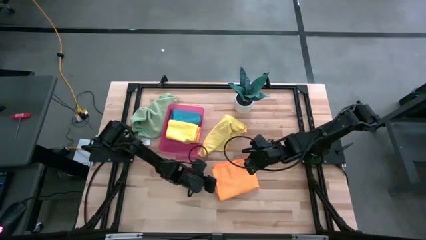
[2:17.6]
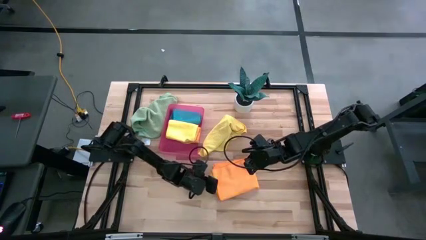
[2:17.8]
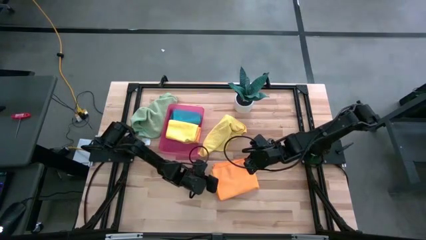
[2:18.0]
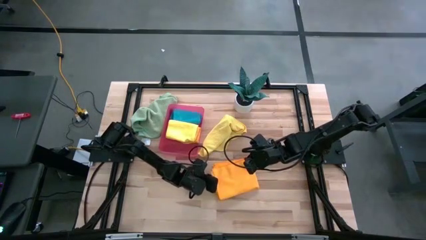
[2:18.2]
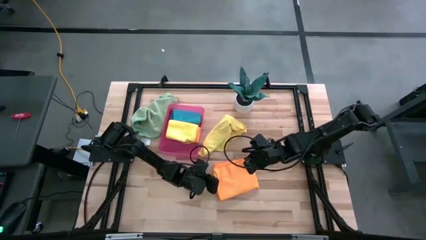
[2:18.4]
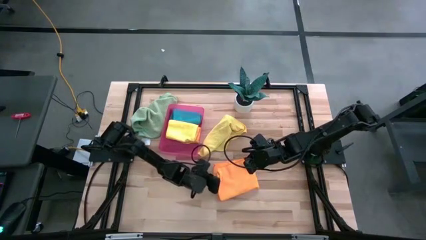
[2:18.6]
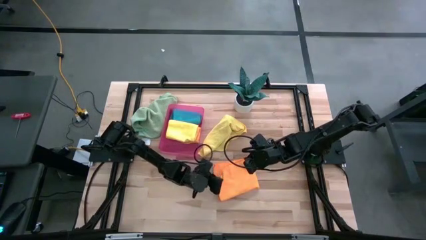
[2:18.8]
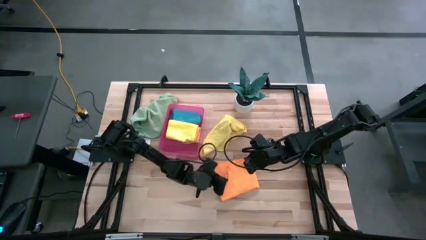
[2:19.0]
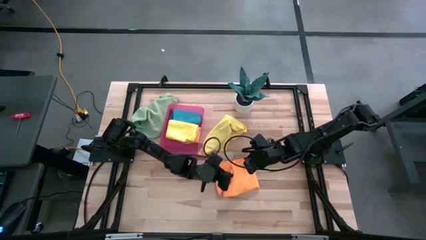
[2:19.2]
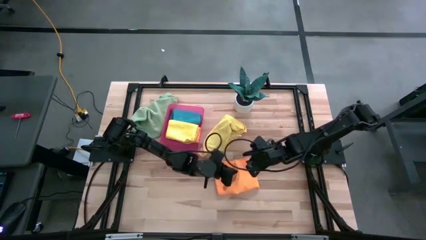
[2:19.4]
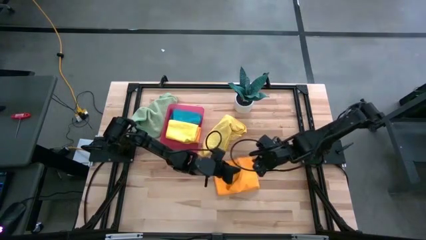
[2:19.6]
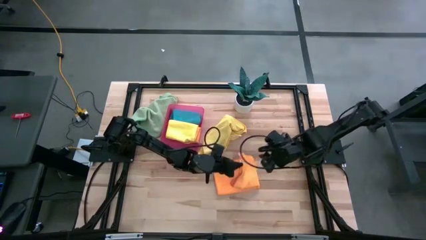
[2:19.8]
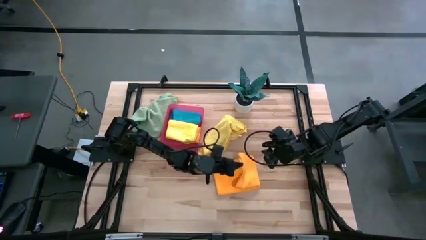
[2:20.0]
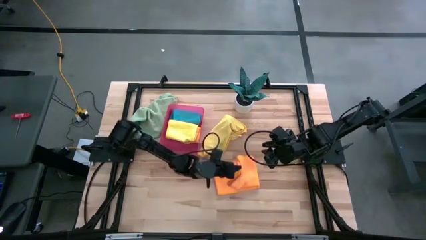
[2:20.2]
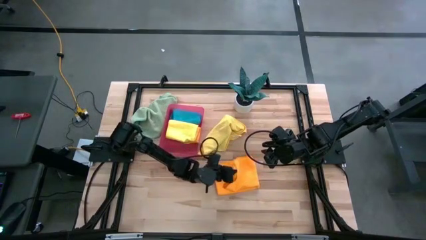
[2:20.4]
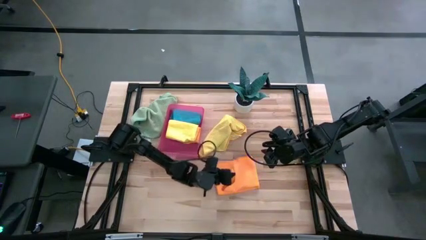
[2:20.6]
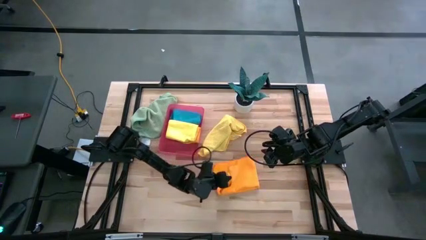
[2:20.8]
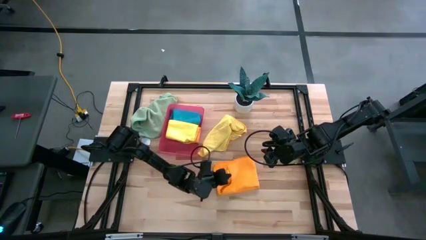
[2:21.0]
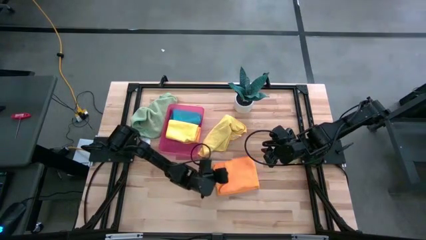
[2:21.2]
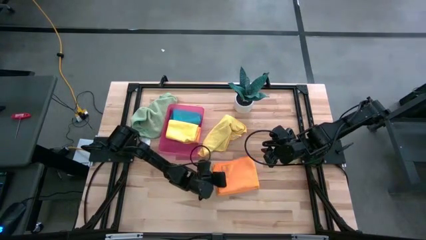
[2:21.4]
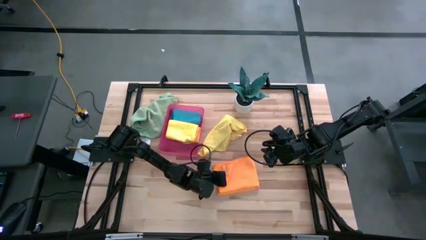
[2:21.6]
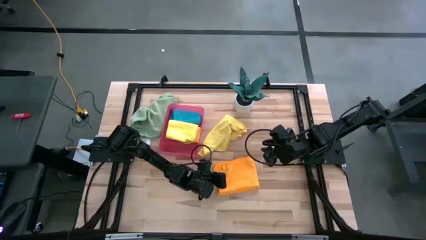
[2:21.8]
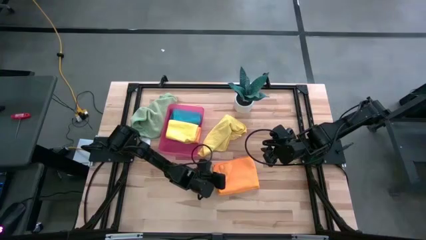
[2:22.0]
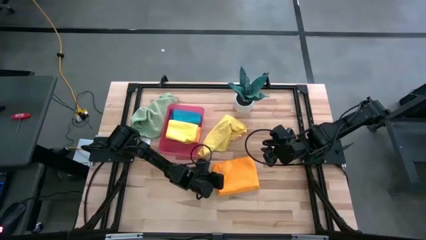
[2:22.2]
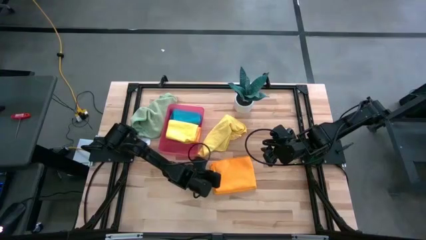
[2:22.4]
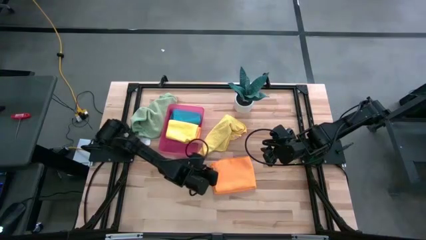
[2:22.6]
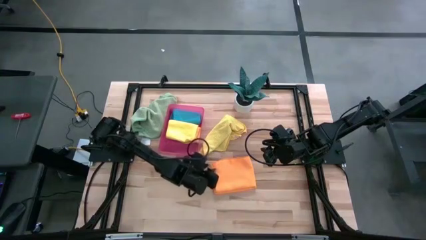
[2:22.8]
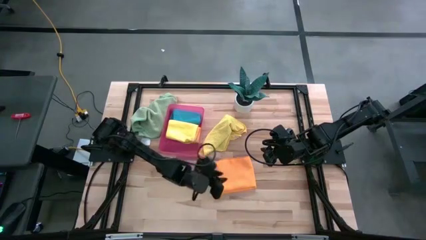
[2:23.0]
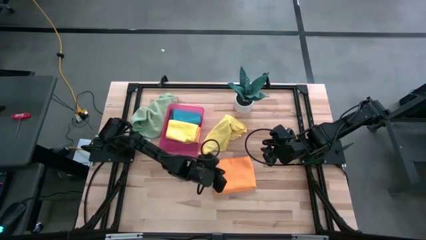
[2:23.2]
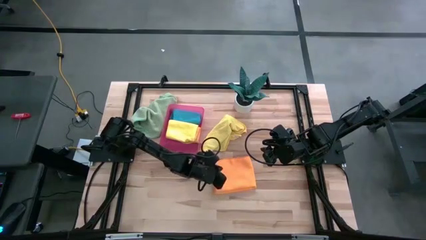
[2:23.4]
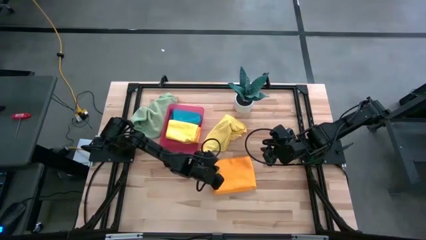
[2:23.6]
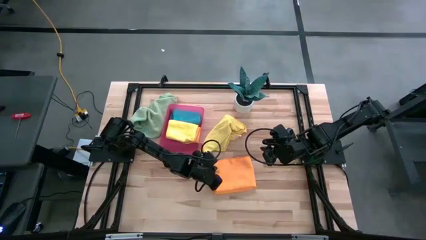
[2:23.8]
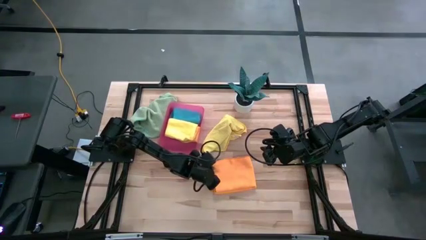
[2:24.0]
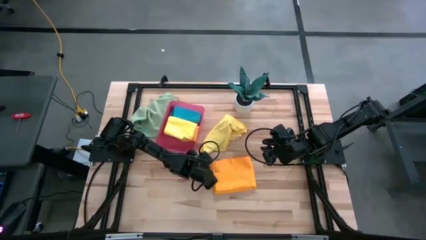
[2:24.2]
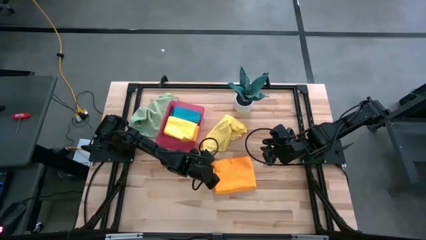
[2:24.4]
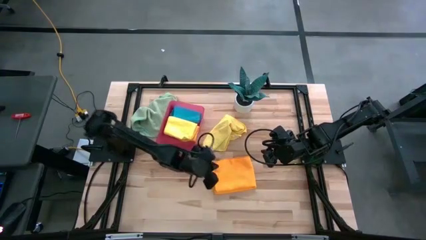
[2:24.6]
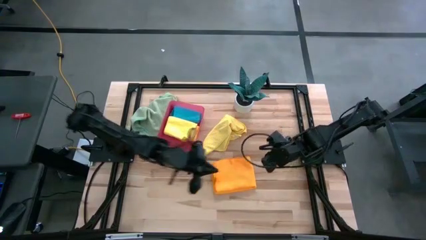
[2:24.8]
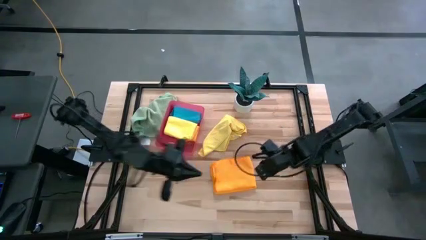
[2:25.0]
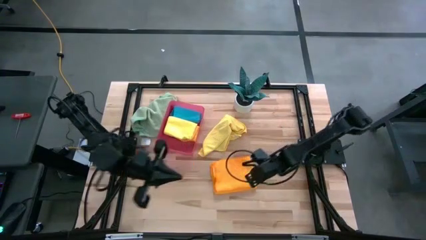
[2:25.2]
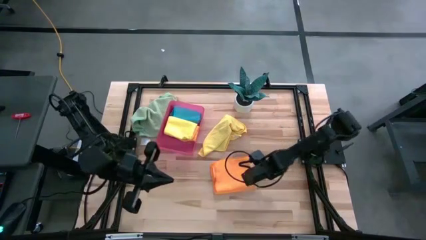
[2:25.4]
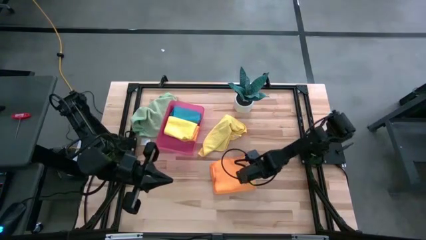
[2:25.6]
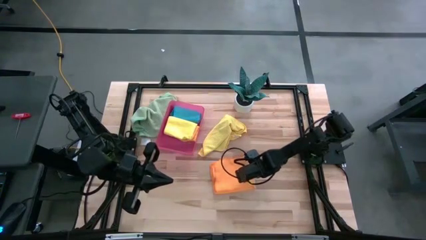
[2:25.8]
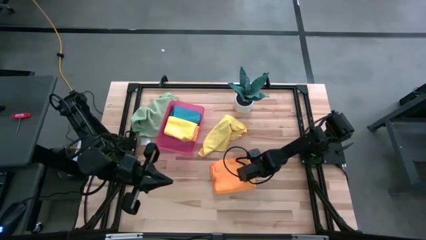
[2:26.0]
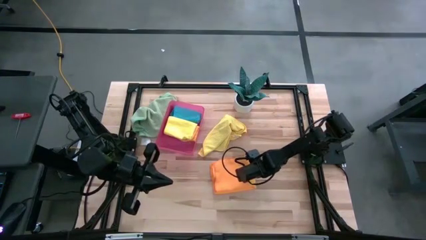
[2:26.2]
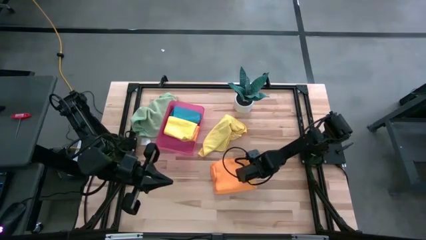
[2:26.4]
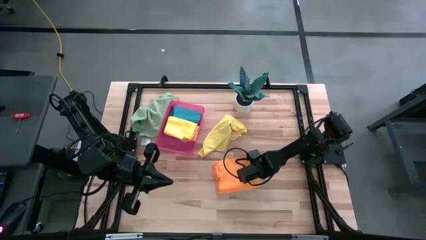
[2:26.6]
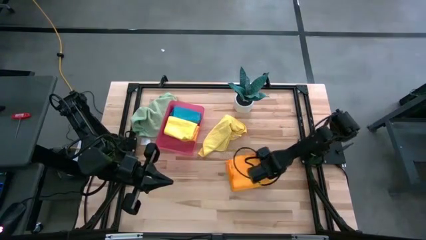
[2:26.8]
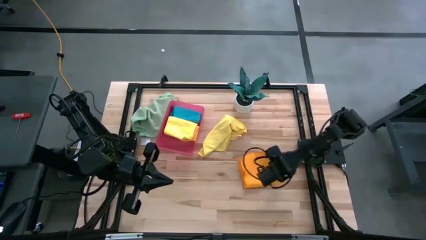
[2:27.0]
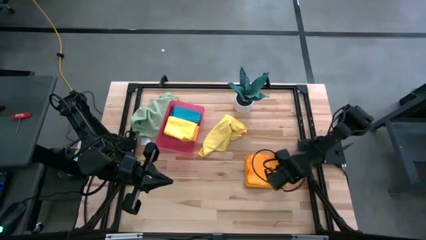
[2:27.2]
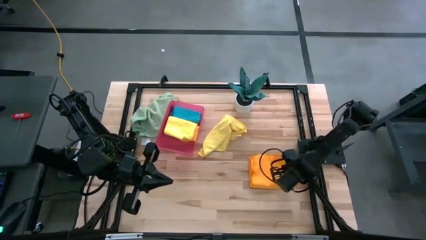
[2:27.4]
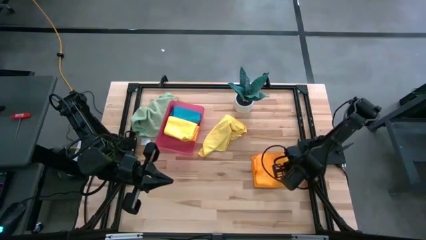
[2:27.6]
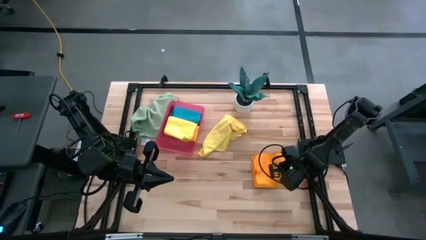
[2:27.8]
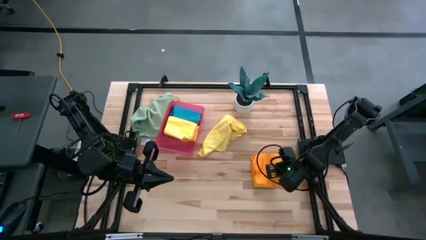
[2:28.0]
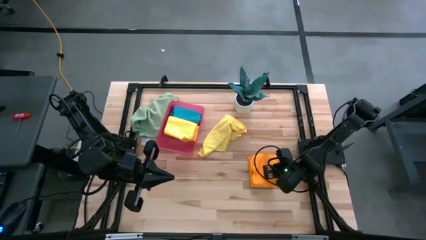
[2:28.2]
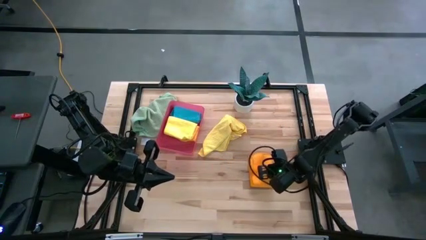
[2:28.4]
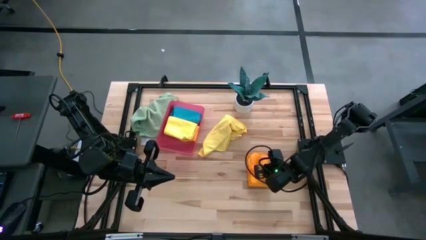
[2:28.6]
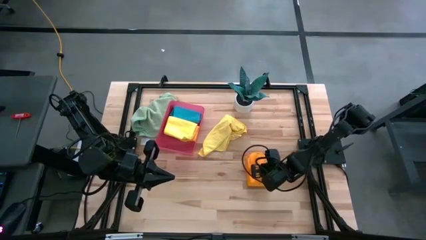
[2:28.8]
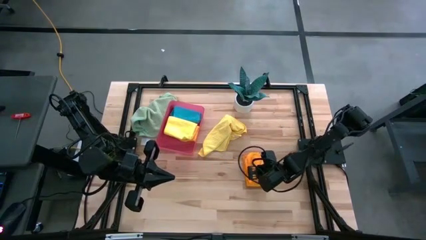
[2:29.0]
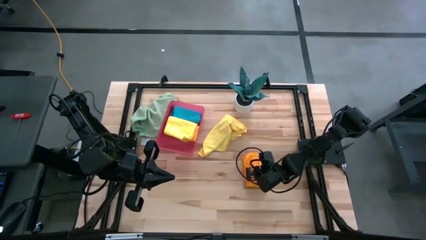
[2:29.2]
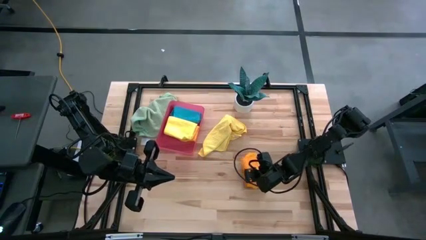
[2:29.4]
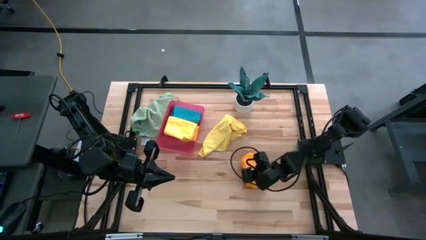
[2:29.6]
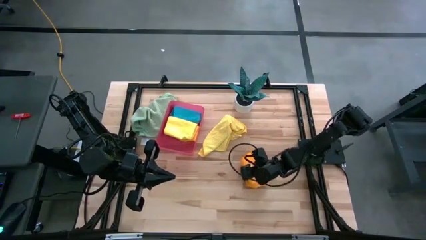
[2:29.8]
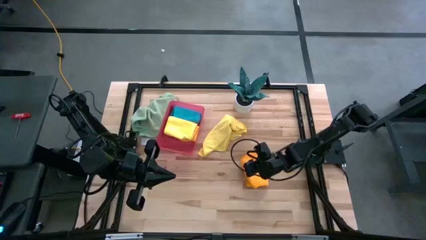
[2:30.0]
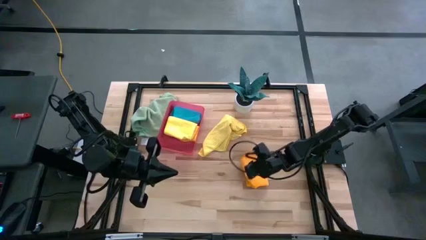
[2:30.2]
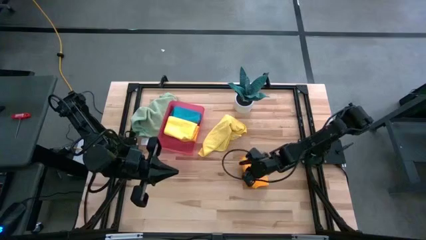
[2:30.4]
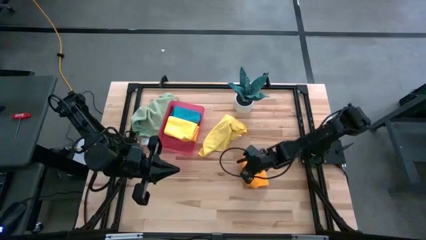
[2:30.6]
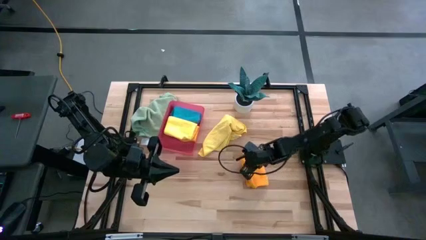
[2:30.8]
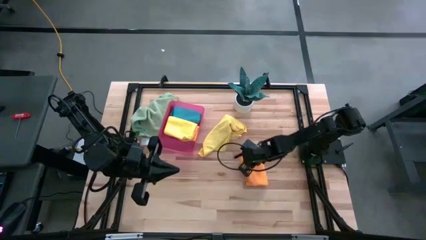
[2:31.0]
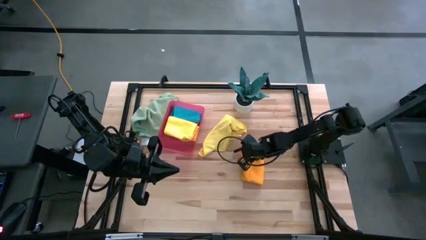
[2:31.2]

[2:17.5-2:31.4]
Task: Fold microfiber towels
Fold the orange microfiber cloth

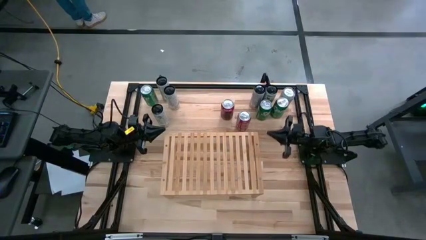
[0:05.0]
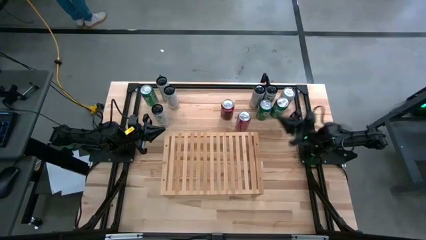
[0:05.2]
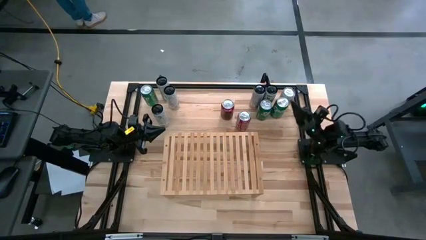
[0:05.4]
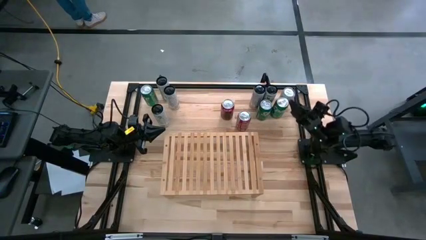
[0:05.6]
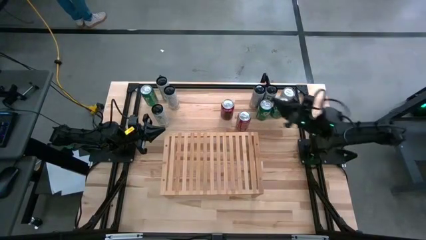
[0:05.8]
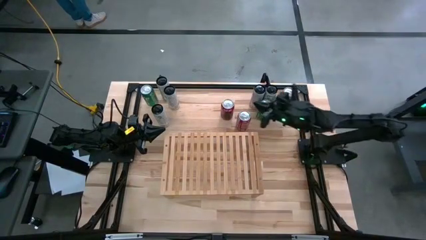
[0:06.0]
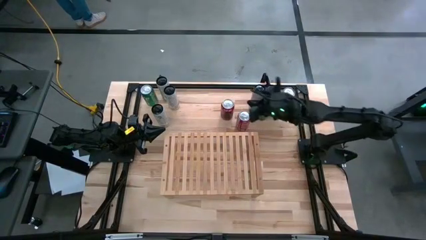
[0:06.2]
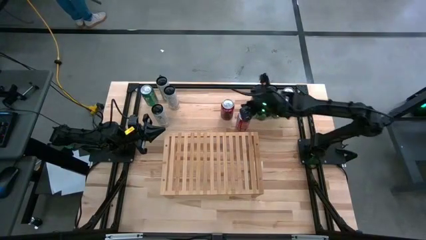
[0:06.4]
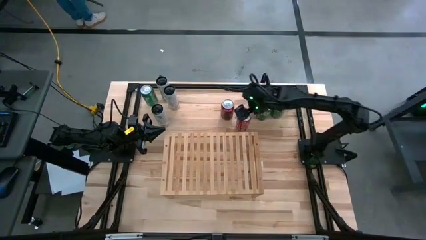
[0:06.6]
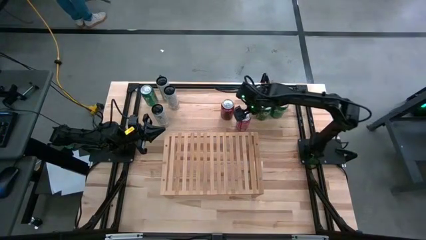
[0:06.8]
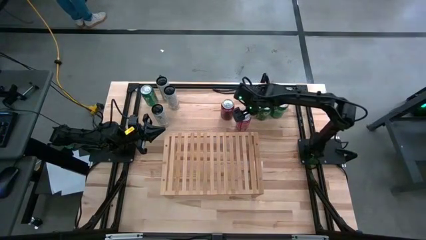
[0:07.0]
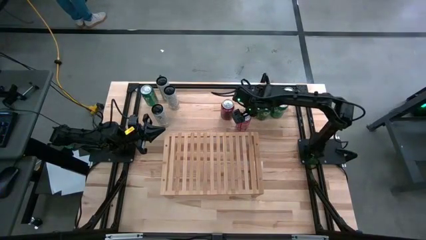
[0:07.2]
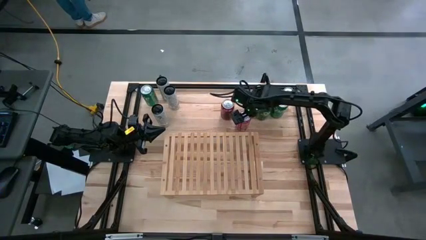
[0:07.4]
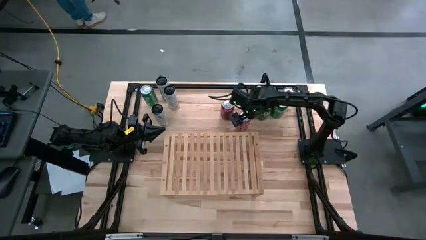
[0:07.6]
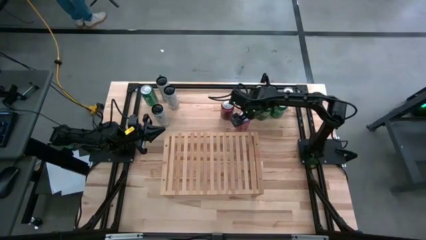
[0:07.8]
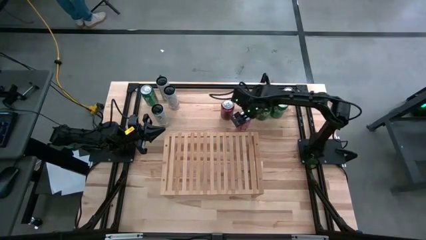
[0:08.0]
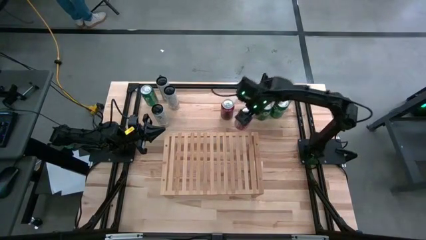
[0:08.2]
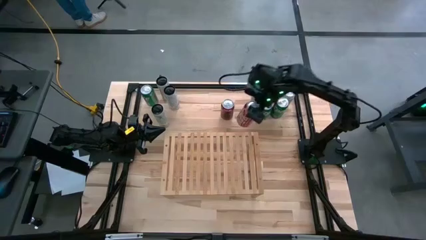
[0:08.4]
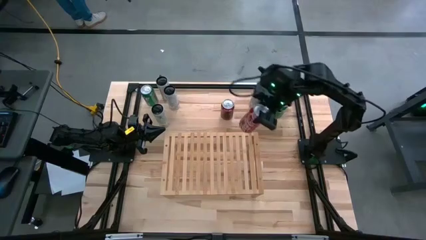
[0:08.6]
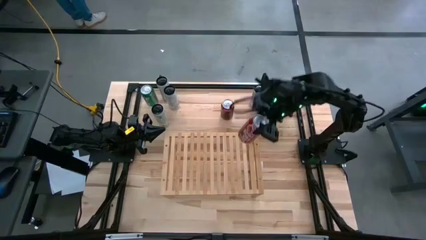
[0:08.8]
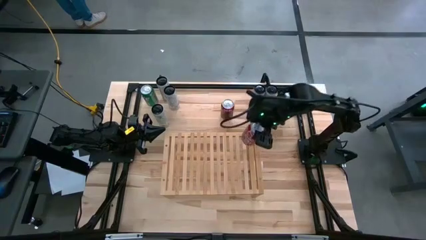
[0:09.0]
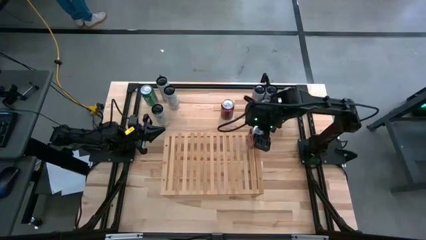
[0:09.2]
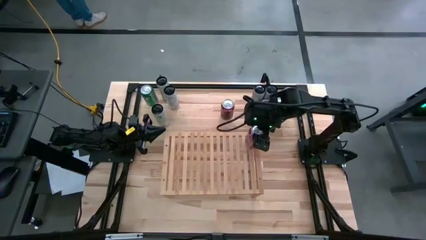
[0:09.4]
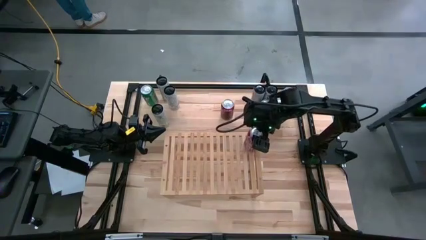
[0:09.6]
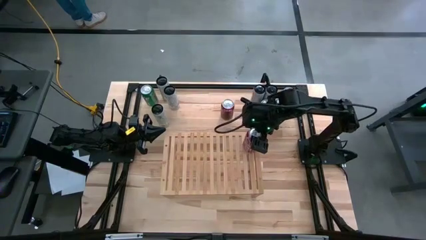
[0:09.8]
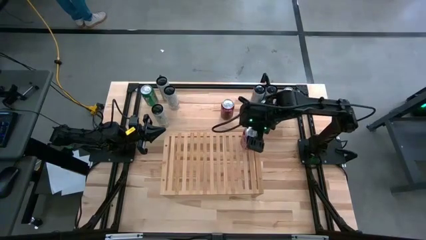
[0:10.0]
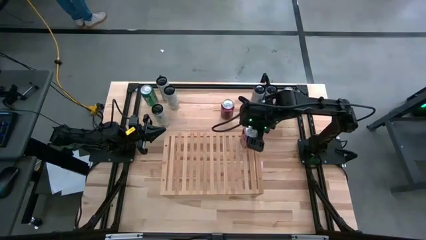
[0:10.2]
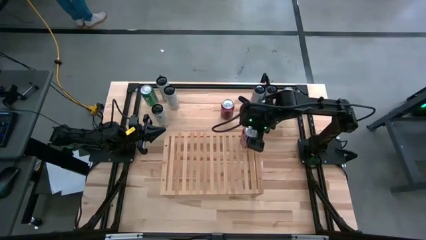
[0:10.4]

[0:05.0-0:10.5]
Task: Place canned beverage on shelf
Put the bottom red-white soda can on the shelf
